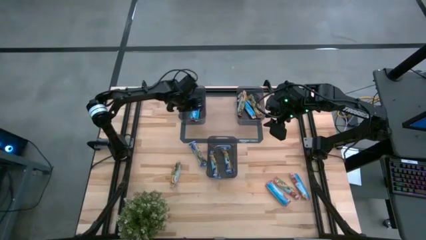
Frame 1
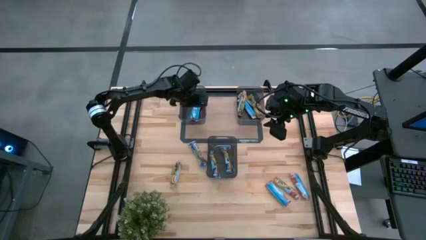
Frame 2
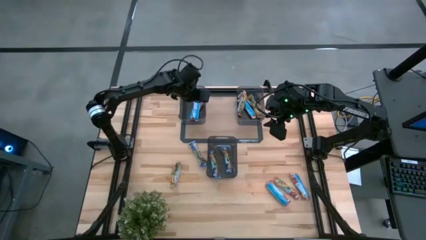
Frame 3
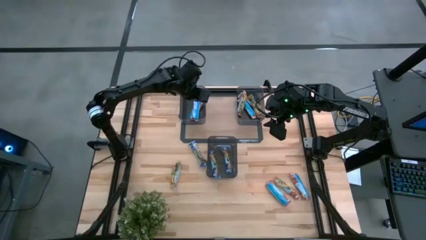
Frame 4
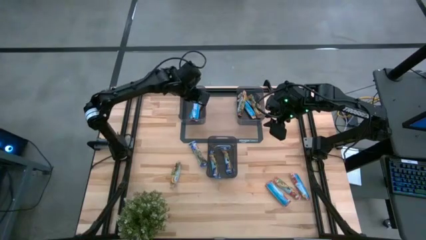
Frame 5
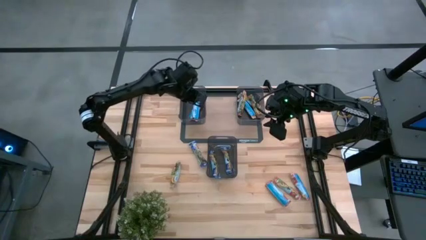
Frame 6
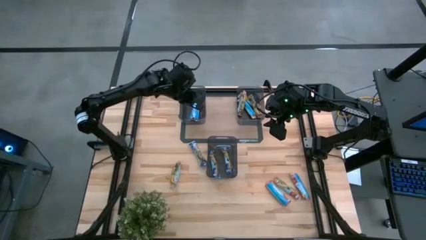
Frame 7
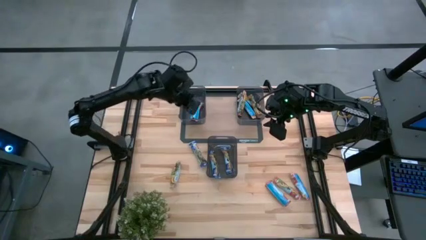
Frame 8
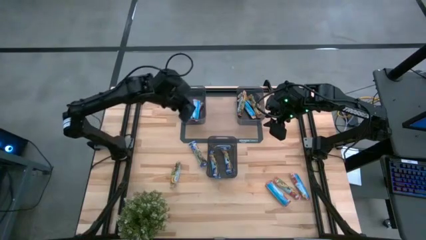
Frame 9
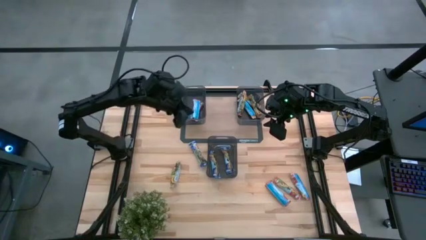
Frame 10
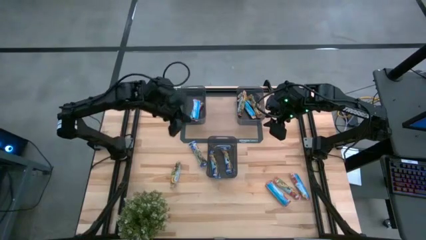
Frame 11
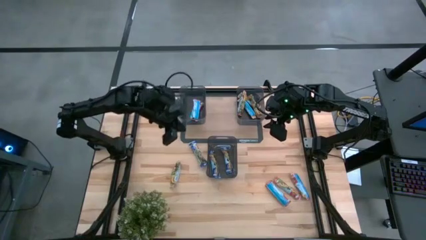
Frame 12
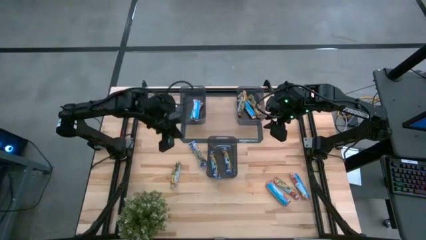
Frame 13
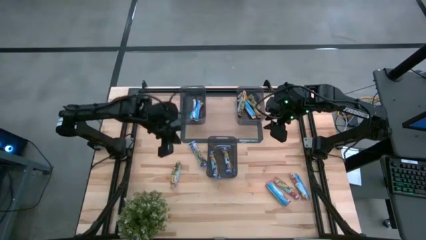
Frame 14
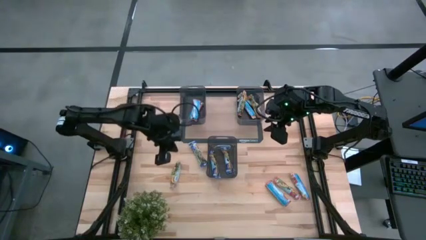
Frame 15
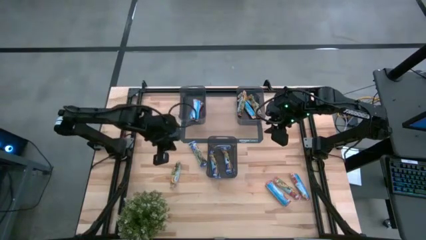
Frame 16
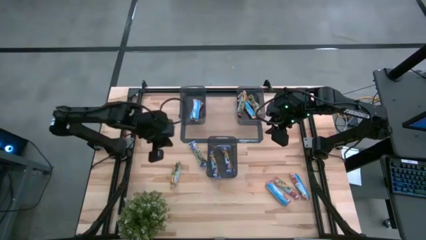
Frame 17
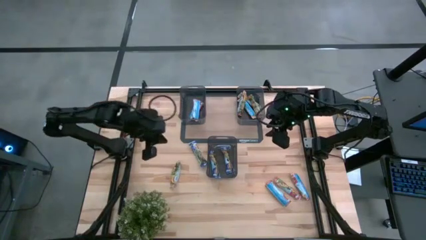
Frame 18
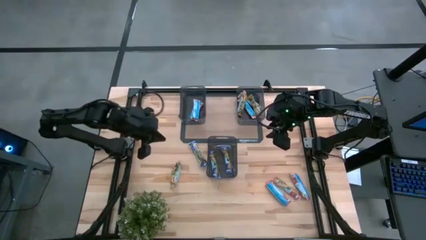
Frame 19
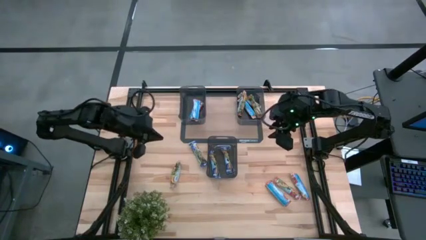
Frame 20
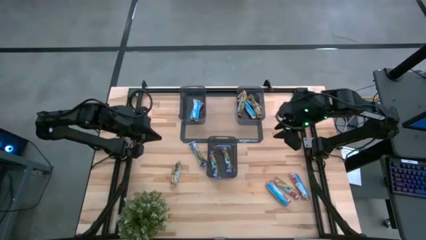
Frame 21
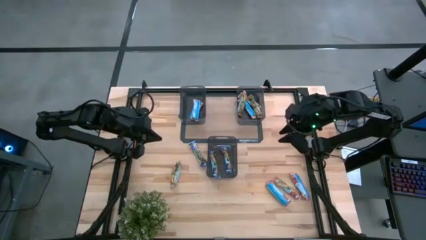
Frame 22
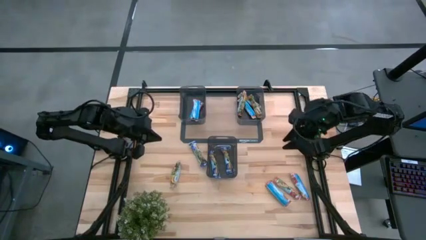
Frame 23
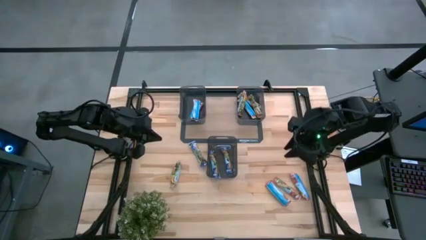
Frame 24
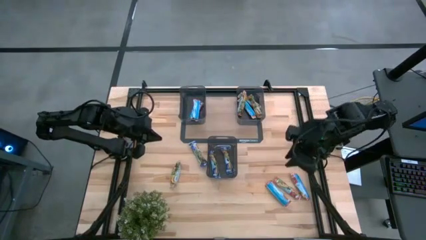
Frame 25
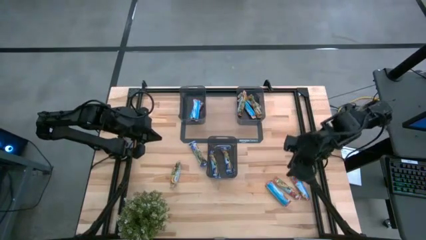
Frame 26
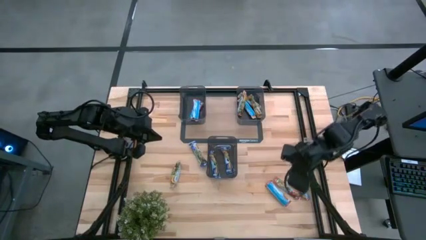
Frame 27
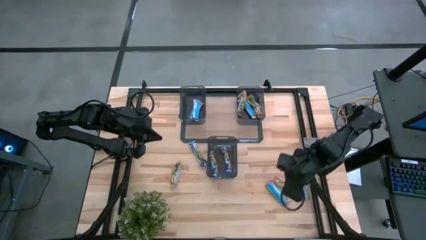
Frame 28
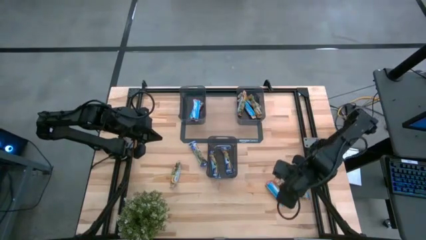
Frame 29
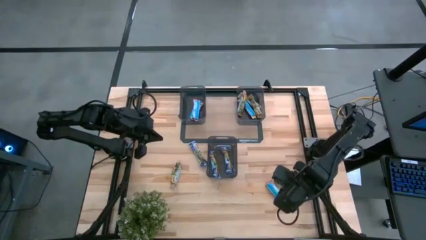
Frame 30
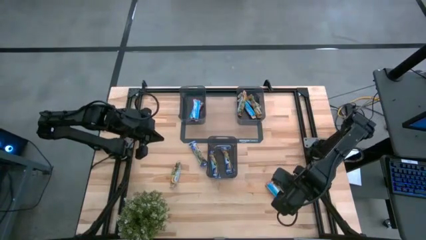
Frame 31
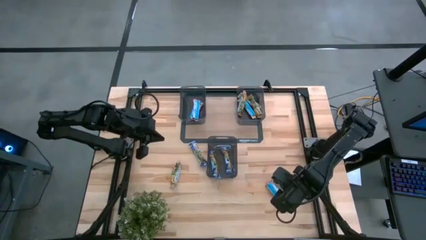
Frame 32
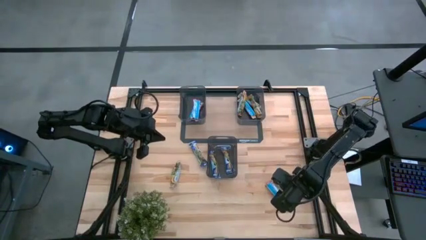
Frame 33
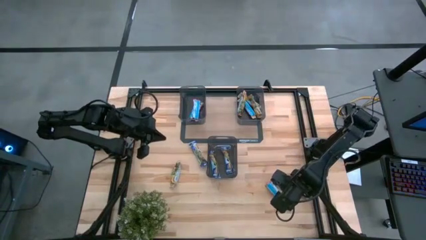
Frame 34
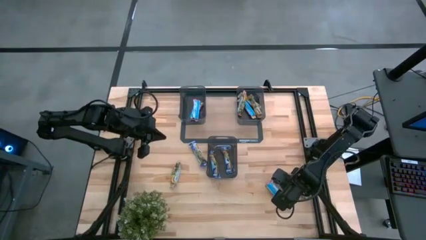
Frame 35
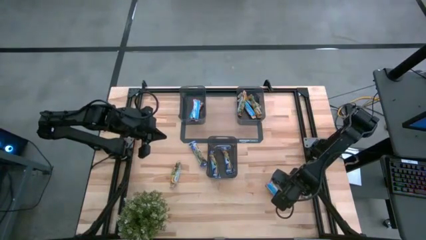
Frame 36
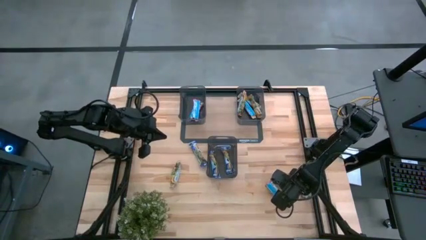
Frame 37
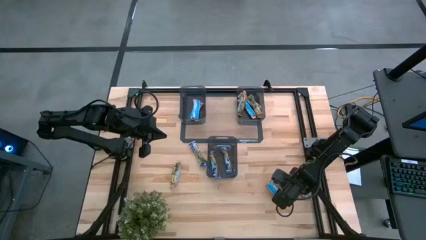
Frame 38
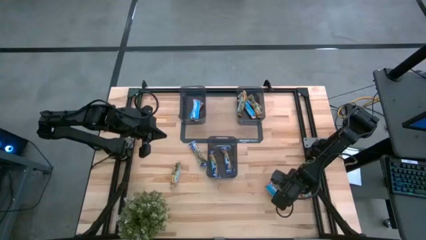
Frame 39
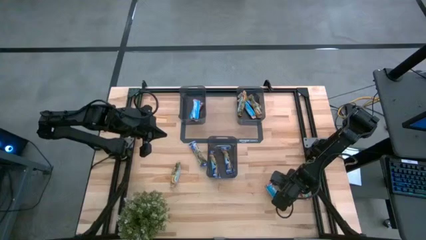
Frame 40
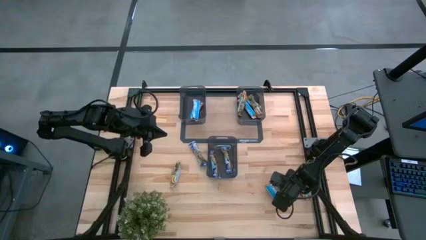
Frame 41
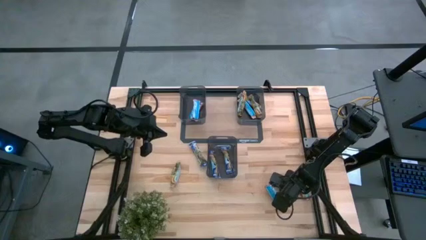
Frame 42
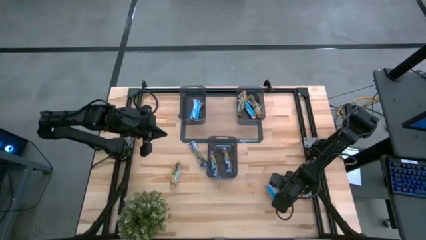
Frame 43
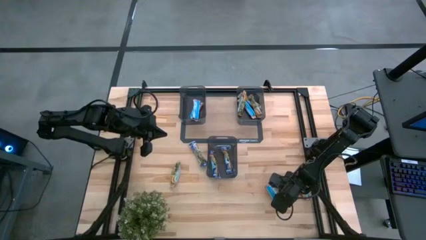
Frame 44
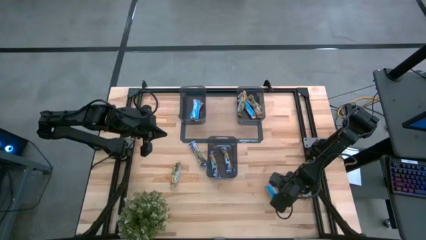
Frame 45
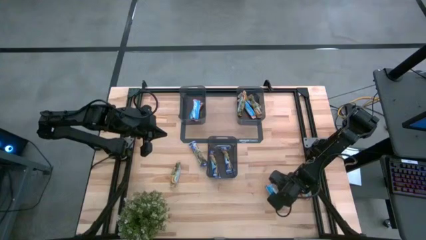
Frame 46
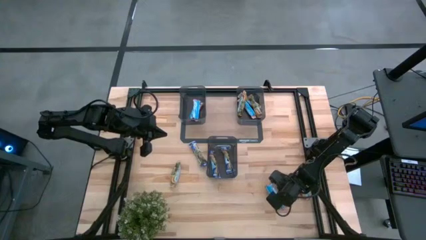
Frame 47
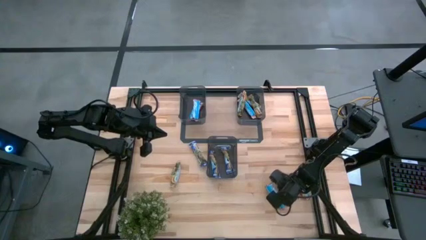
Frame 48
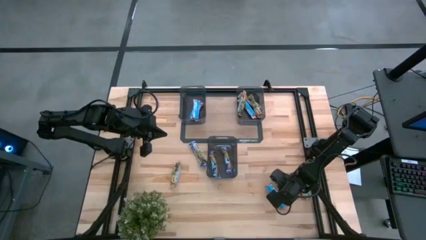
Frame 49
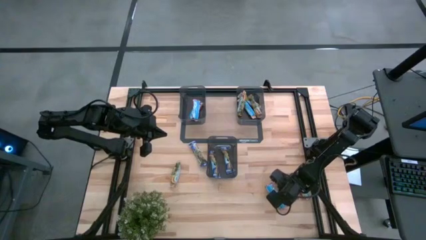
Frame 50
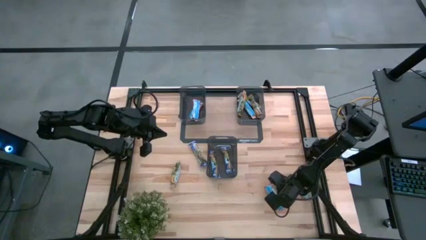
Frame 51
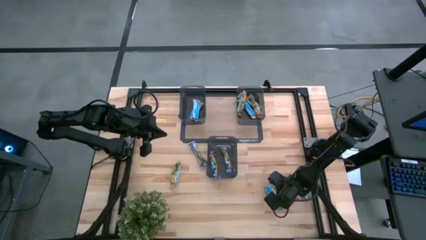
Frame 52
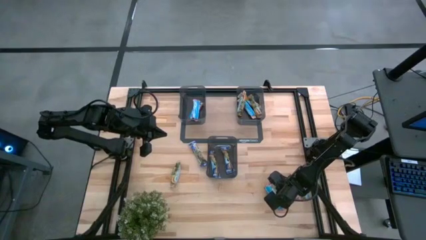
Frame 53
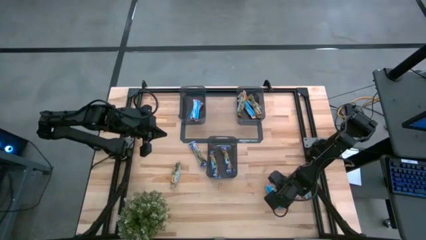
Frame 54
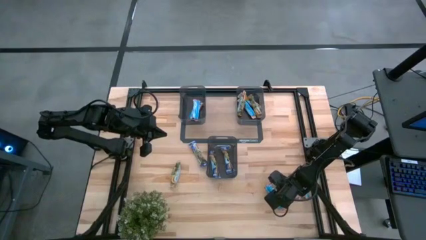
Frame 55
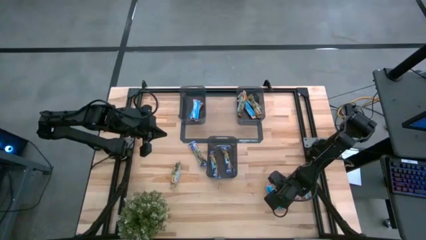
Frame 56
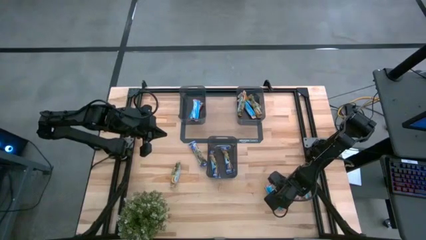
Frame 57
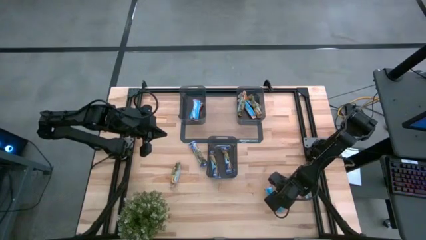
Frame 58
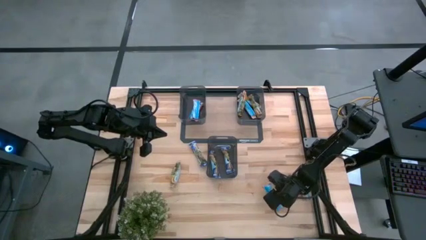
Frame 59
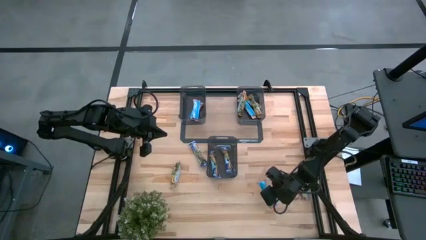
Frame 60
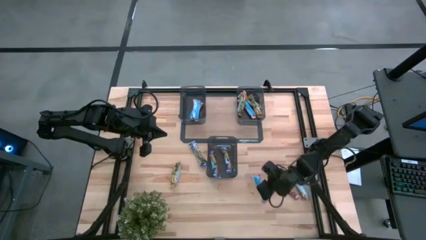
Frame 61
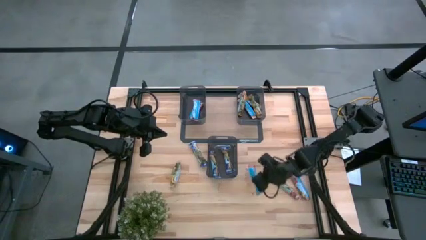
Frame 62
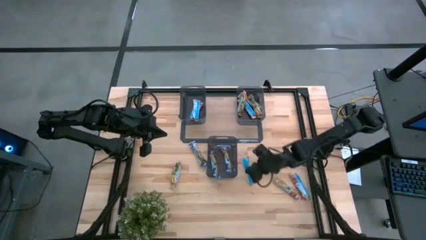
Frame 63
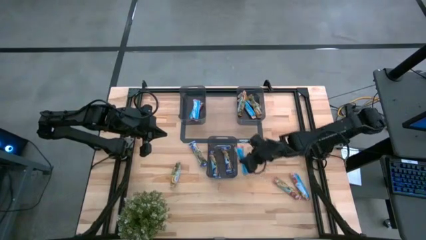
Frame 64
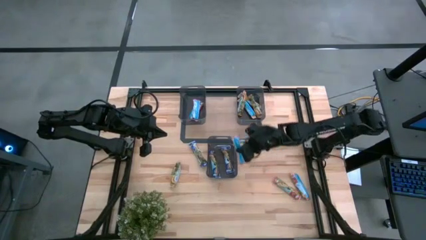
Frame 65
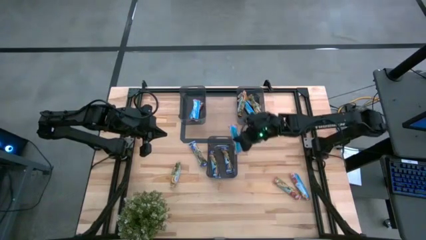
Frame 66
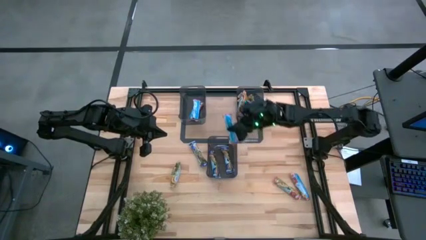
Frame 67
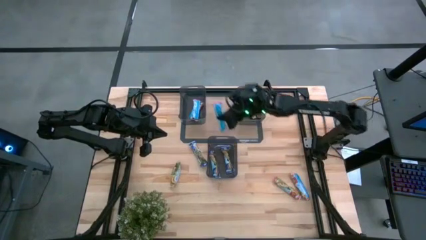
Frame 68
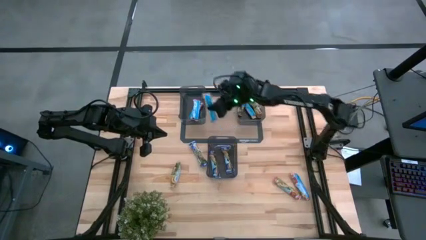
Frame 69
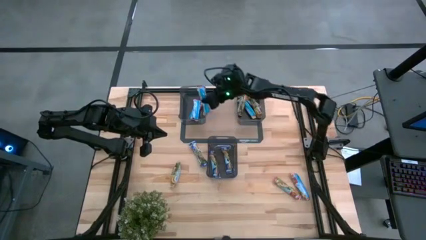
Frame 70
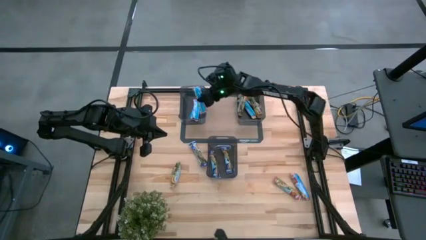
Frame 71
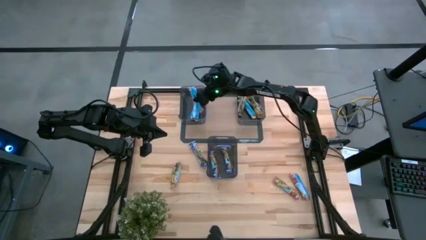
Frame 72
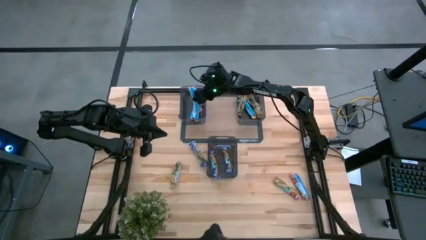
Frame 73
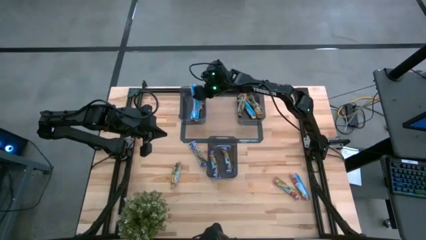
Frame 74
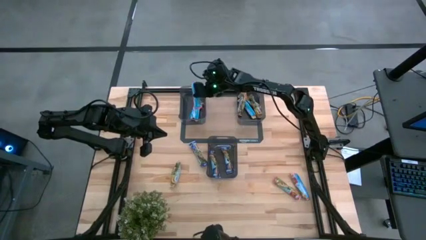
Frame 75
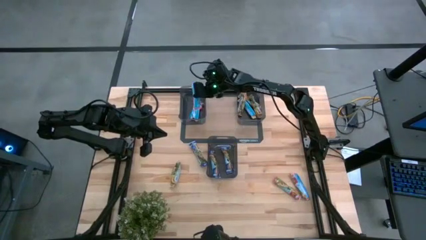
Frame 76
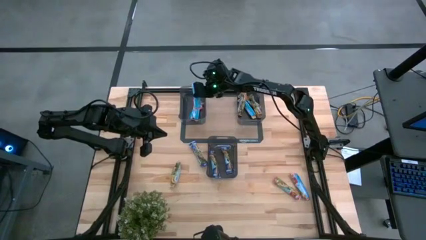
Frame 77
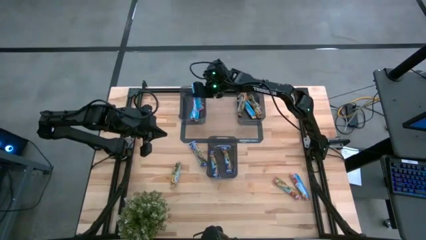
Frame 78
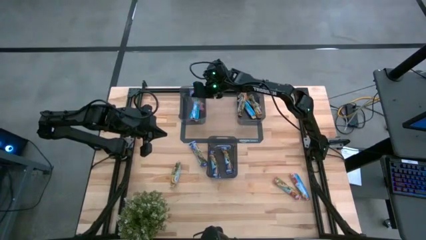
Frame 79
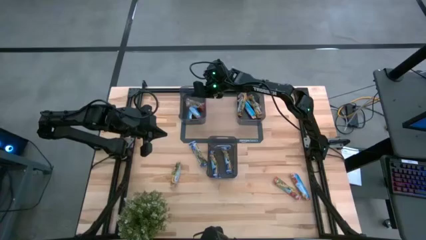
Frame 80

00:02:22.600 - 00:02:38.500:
Task: Pick and place Granola Bars by type
Put the red granola bar into the left black bin
